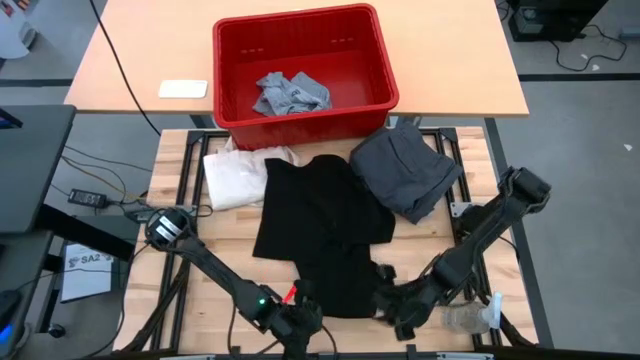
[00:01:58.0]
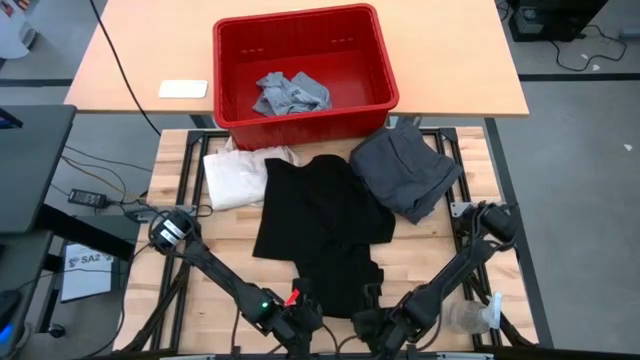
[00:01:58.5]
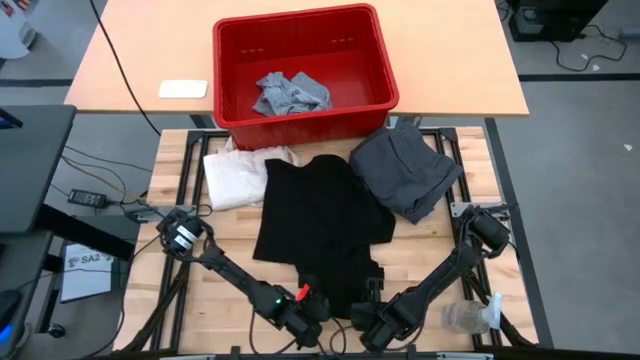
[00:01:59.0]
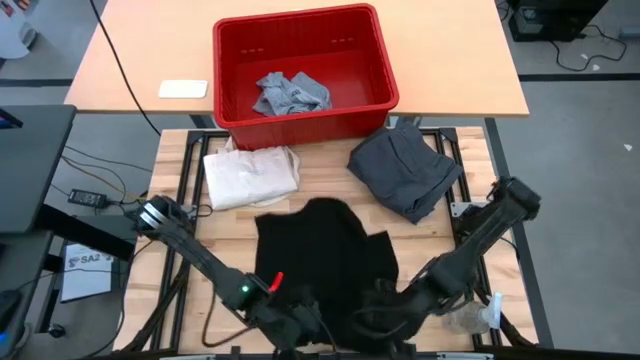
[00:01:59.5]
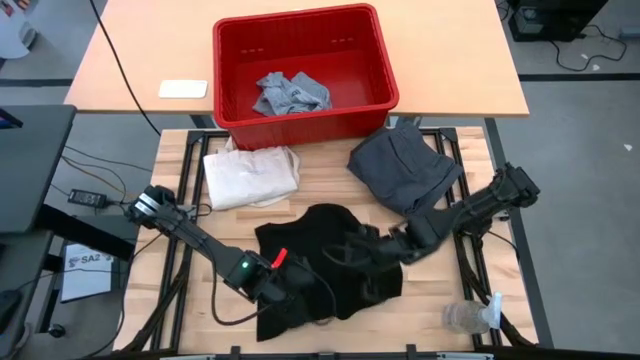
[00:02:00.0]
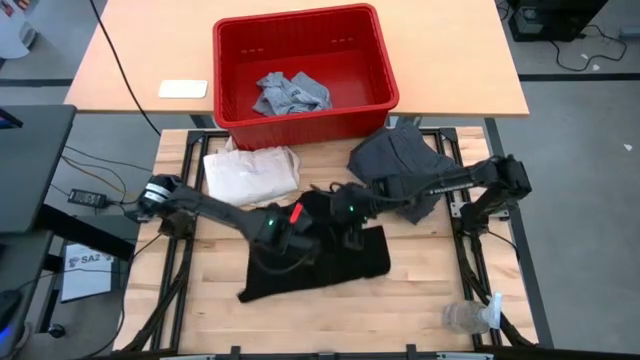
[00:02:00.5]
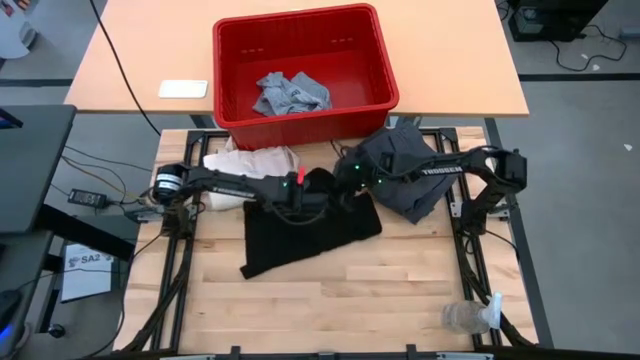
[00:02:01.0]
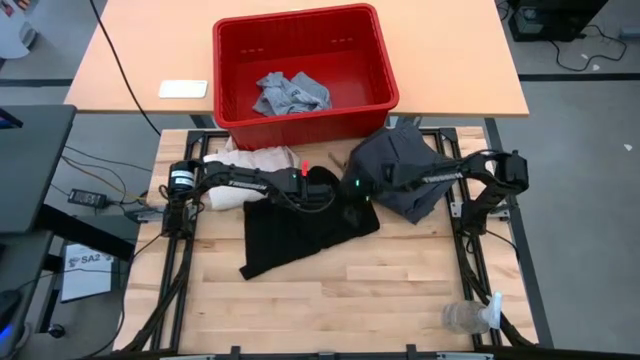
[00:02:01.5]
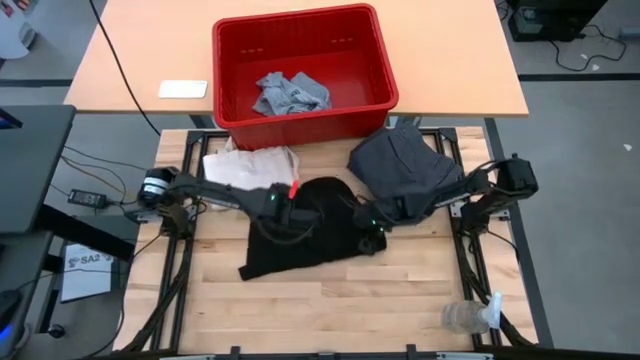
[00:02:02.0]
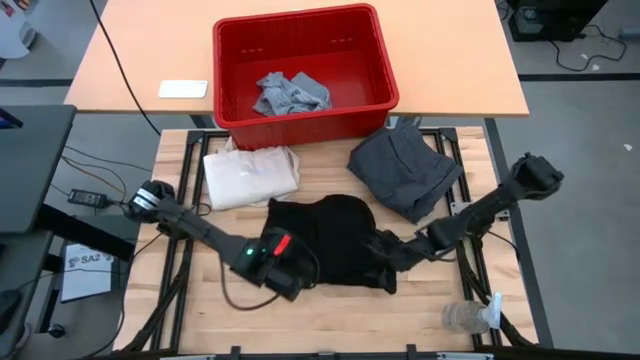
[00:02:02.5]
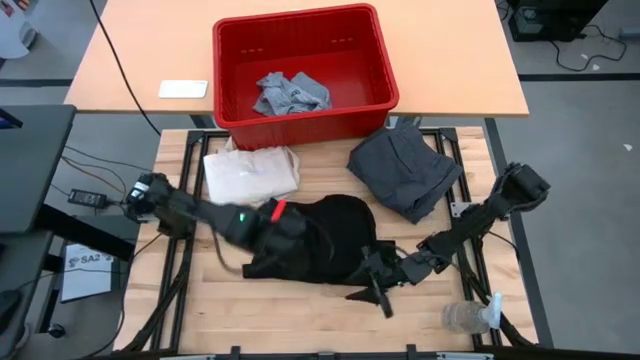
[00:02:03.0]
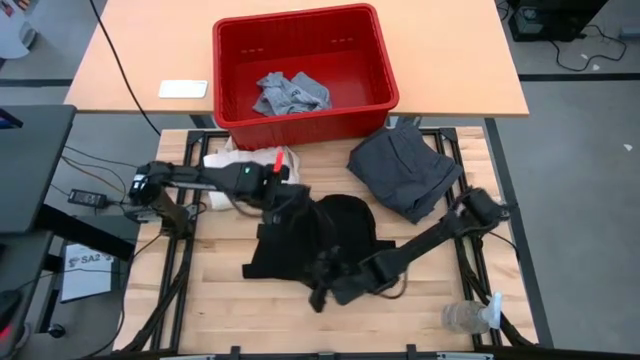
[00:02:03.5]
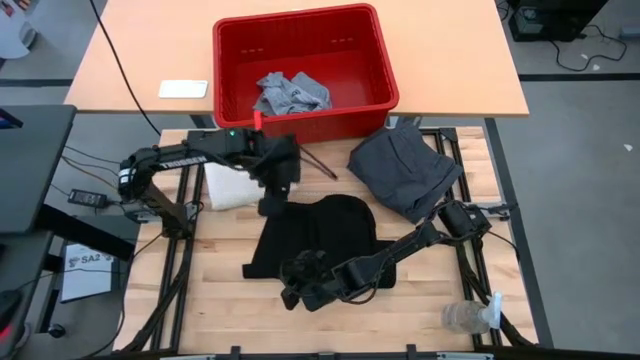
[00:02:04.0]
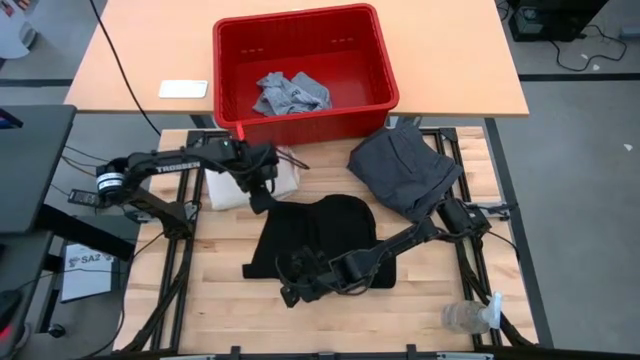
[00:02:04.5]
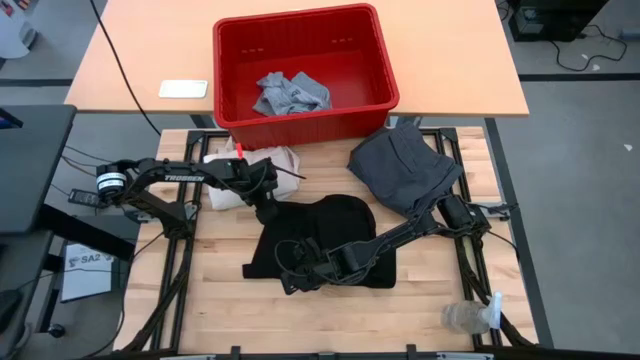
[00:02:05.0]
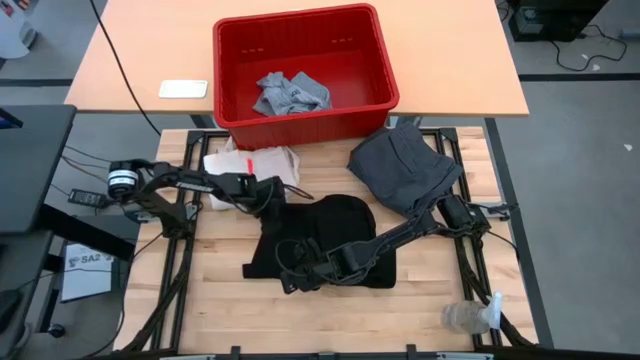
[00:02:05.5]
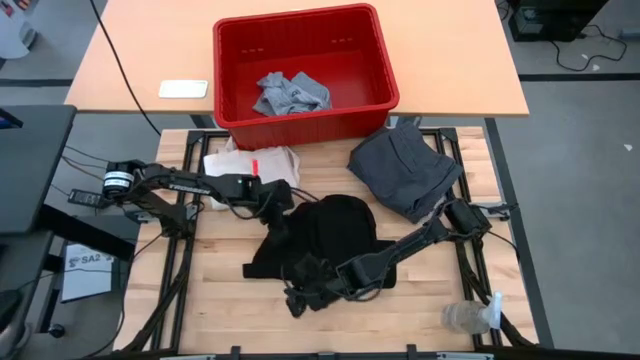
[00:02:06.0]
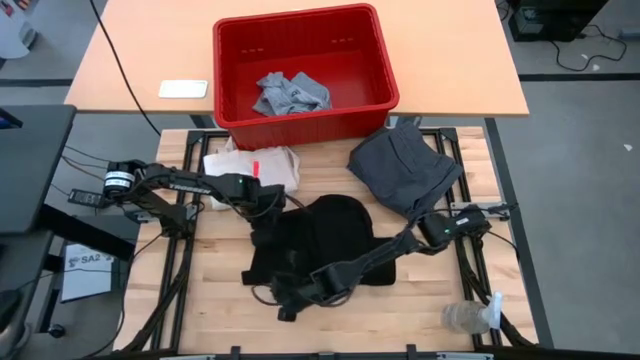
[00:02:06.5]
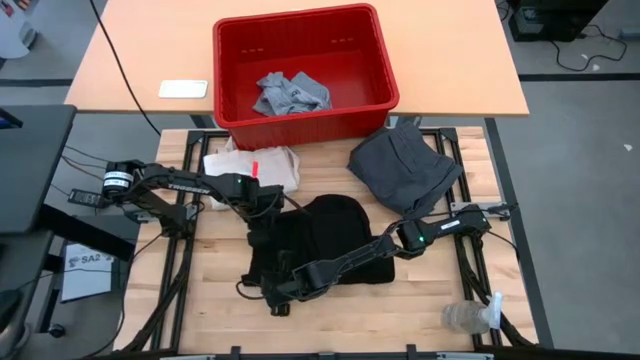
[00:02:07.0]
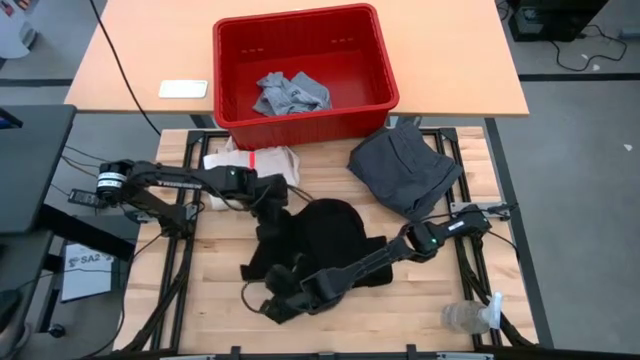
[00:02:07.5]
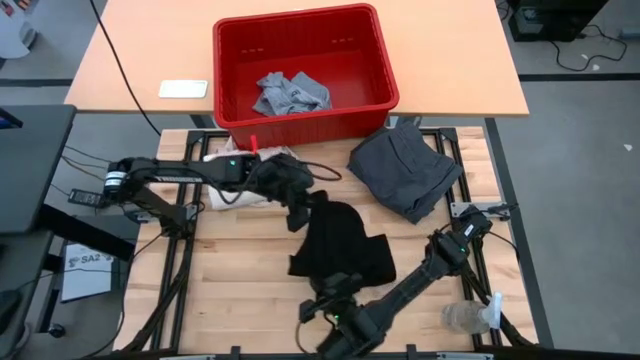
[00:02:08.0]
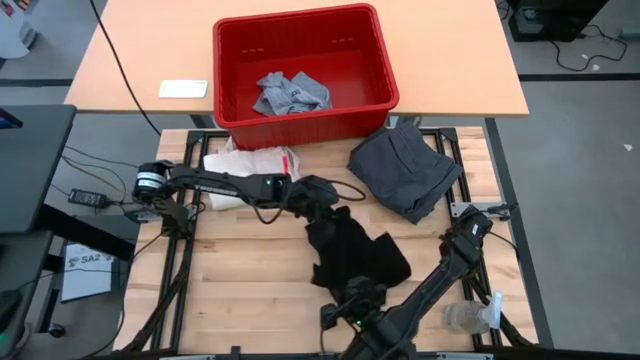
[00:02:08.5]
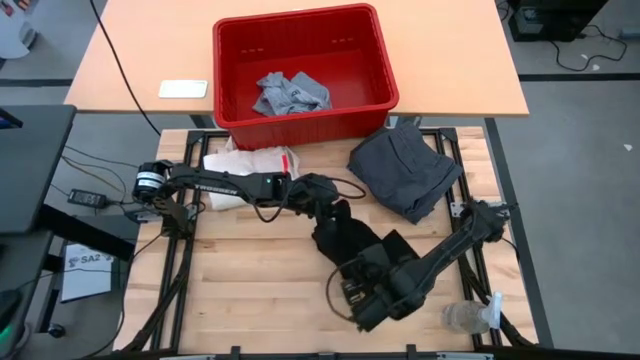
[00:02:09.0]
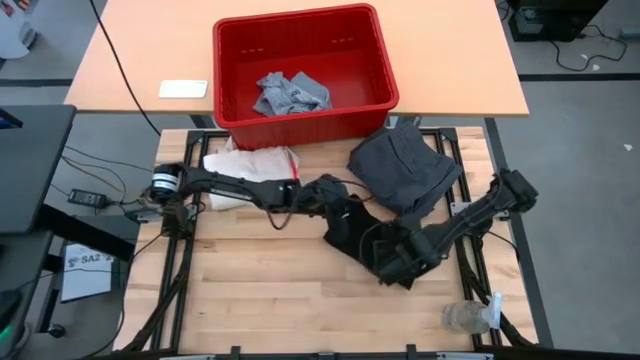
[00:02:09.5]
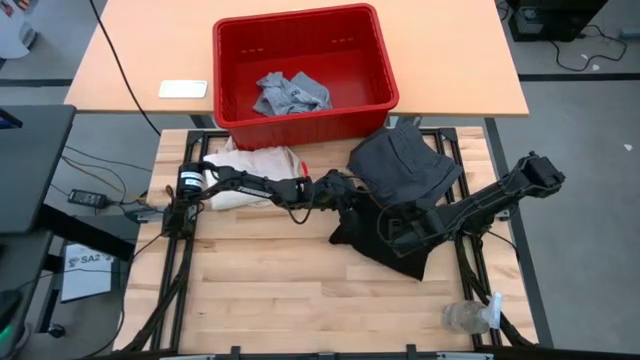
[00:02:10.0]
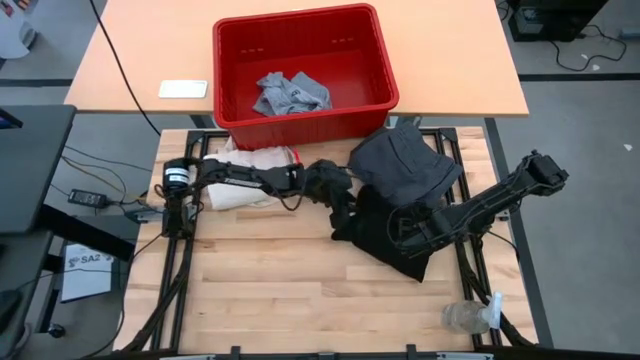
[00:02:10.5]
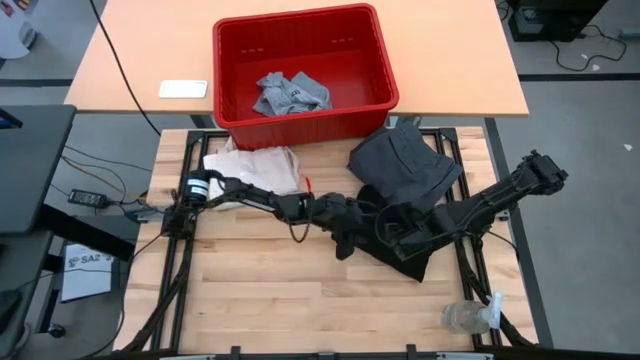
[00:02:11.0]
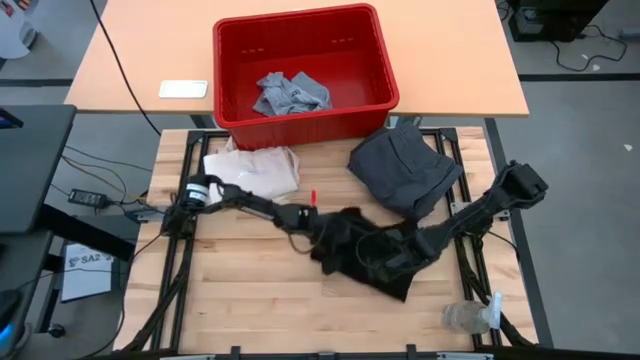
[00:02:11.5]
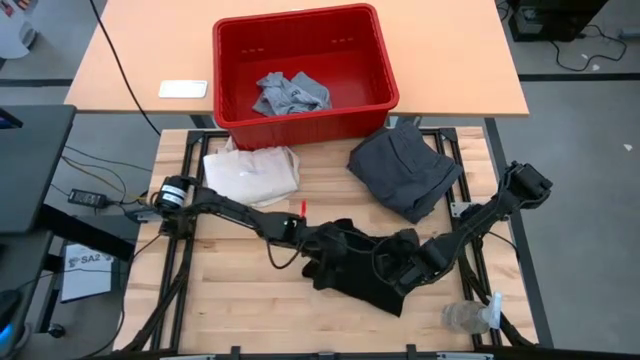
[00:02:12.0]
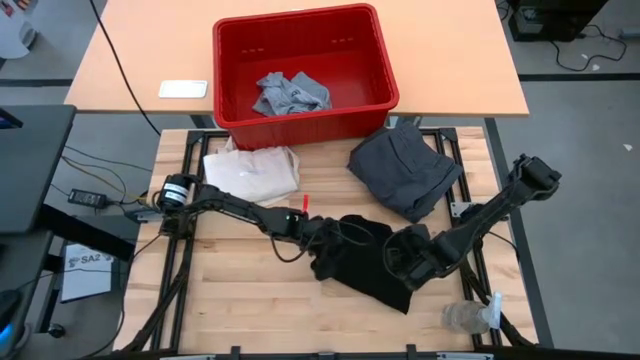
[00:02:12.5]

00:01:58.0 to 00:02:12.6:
Task: Fold laundry
Fold the black shirt

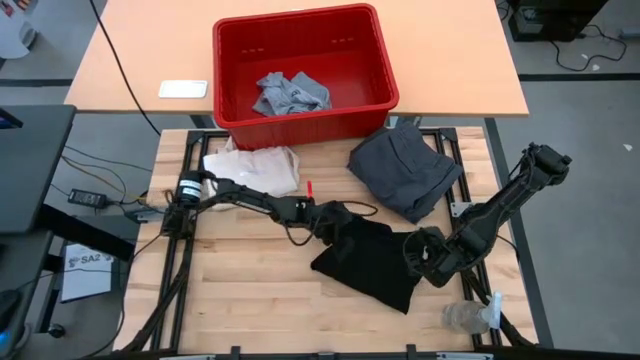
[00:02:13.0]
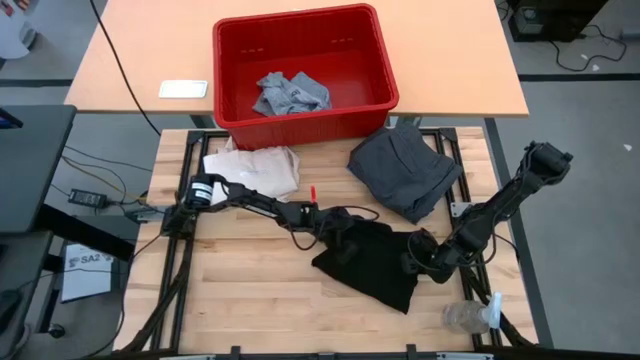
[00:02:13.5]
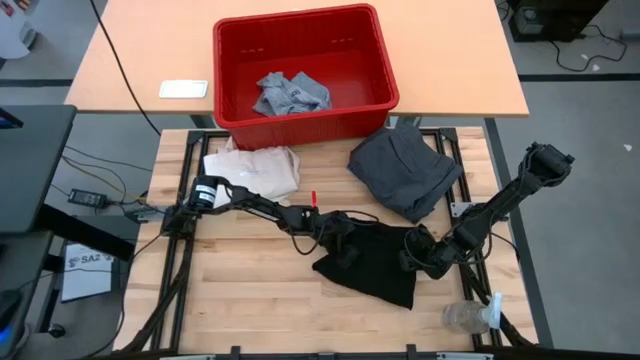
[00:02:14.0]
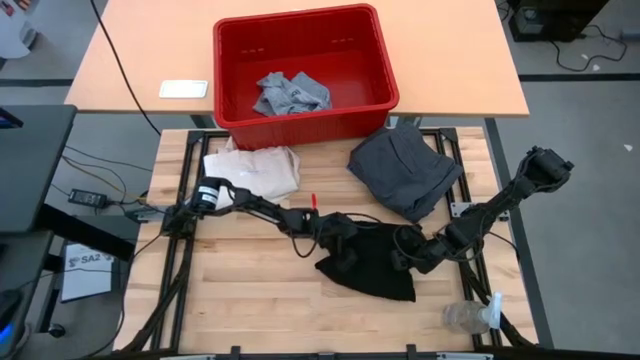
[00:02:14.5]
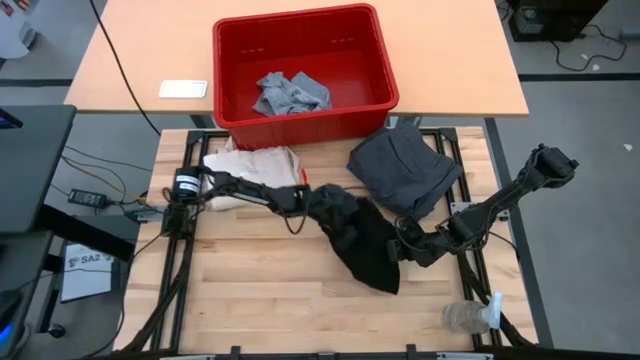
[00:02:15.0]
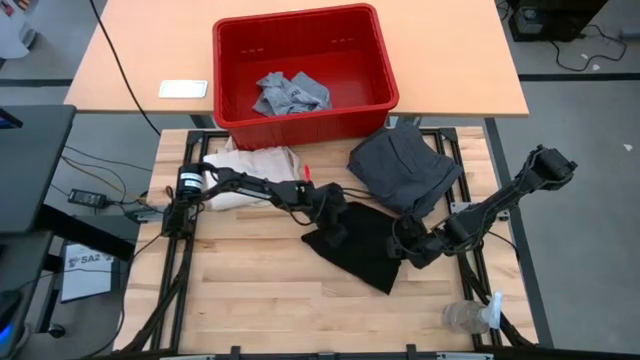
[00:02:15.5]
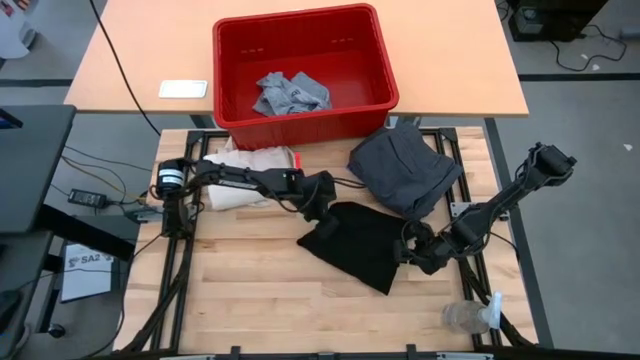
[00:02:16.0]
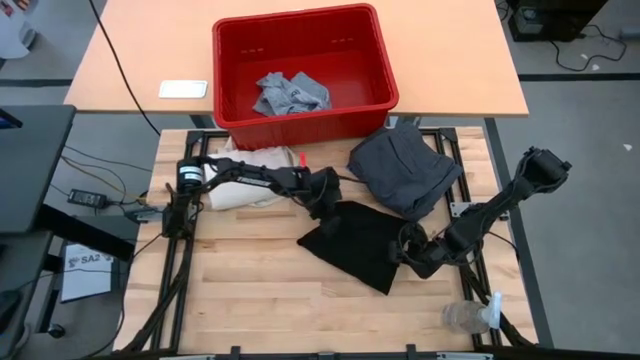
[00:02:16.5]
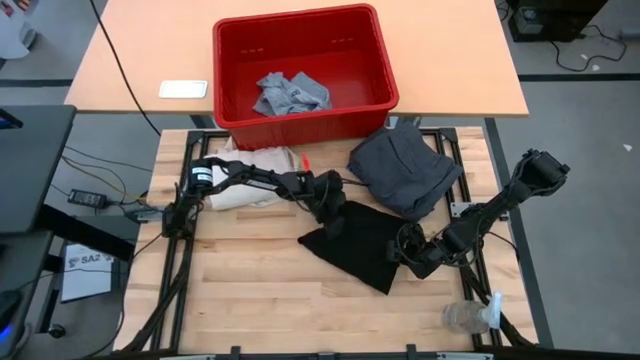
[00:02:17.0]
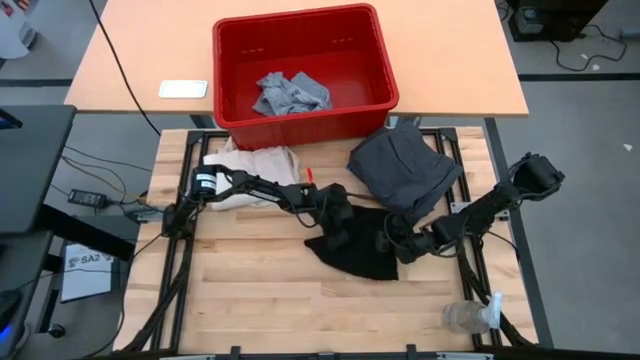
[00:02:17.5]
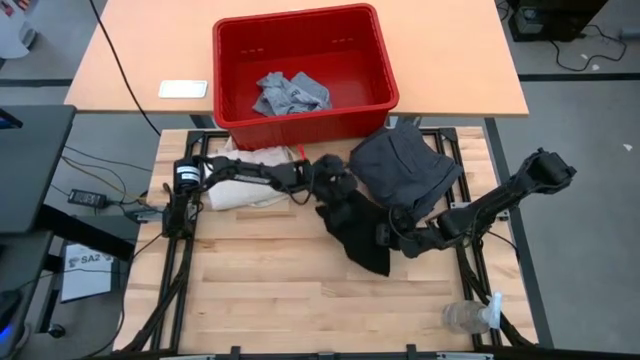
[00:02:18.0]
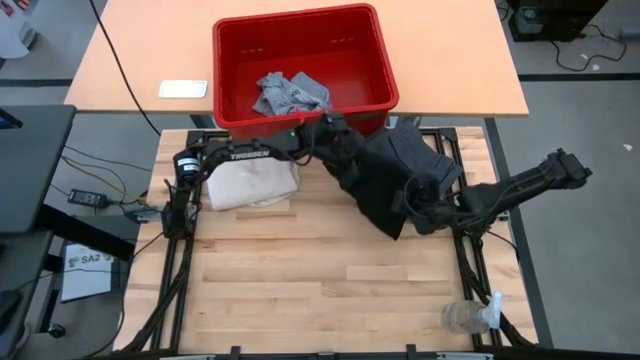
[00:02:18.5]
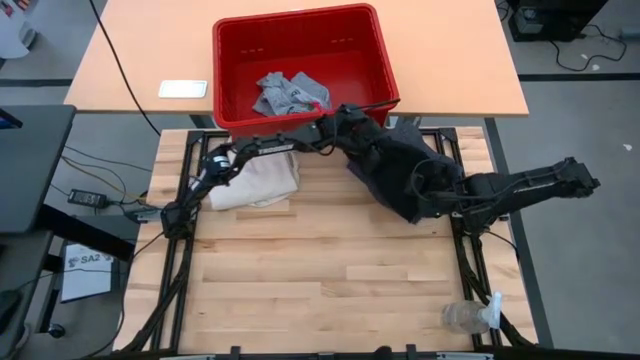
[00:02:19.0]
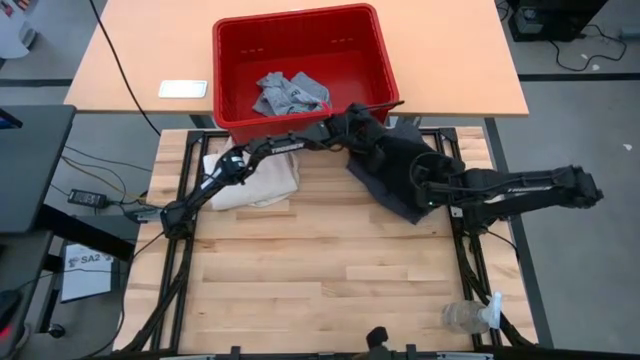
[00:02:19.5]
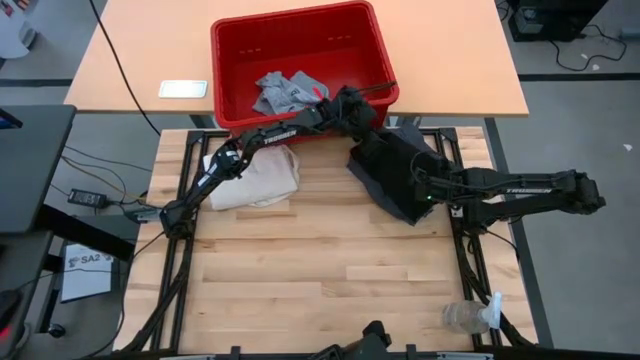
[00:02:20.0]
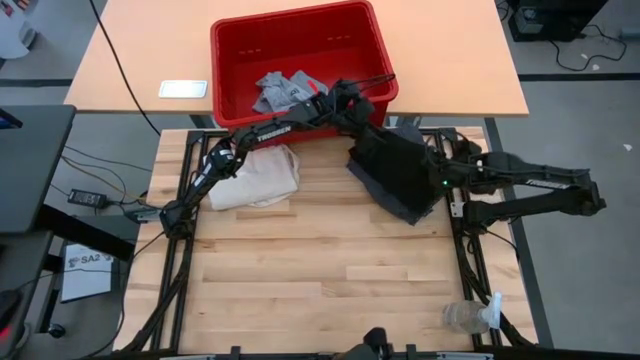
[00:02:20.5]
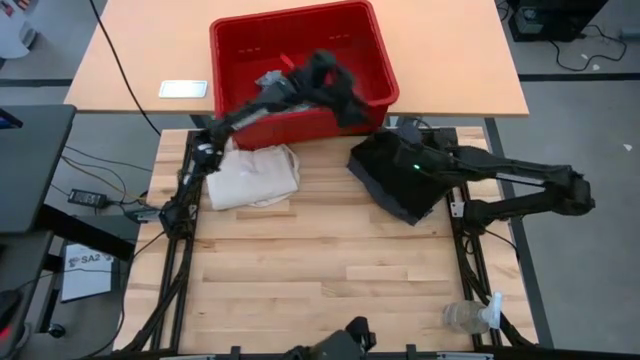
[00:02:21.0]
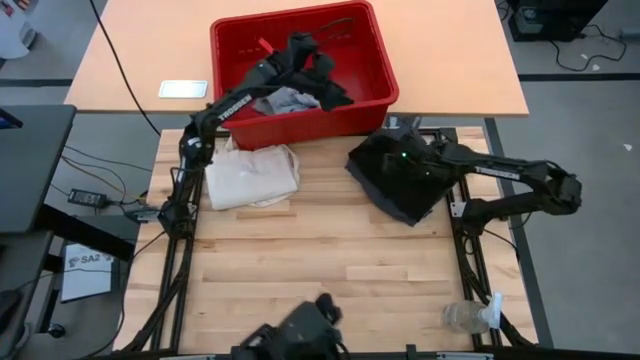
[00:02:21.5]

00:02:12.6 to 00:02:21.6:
Stack the black shirt on top of the gray folded short
